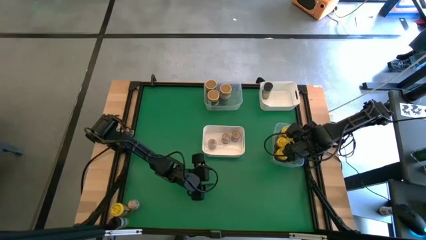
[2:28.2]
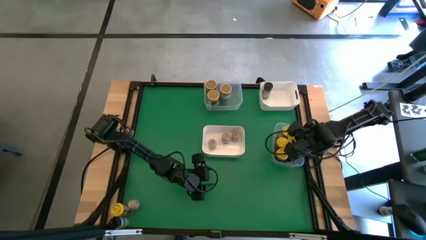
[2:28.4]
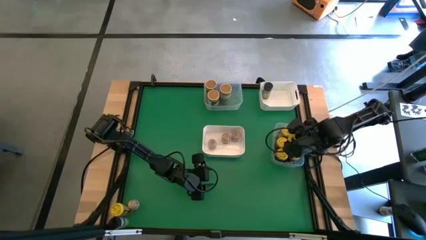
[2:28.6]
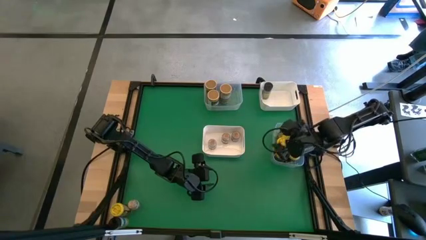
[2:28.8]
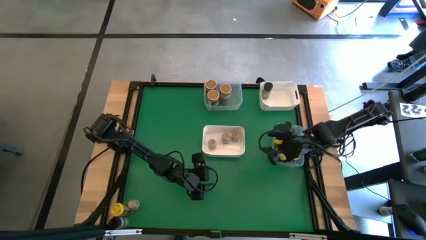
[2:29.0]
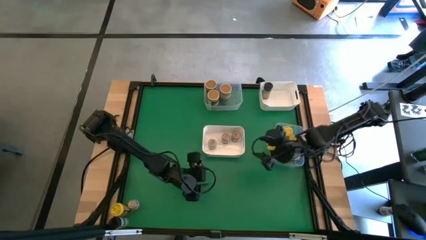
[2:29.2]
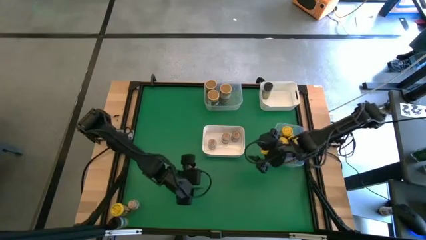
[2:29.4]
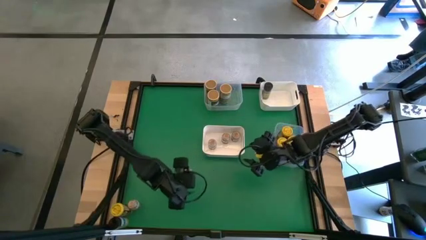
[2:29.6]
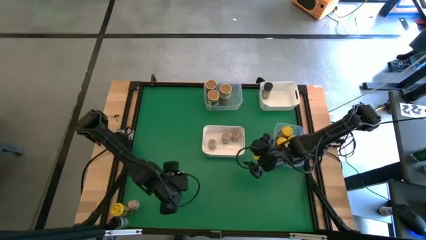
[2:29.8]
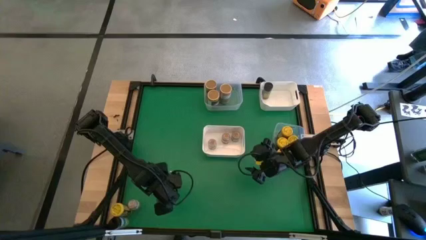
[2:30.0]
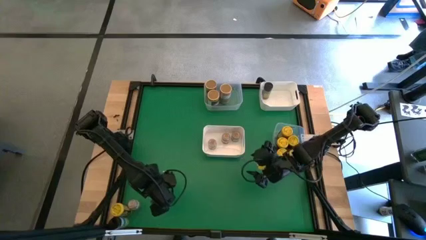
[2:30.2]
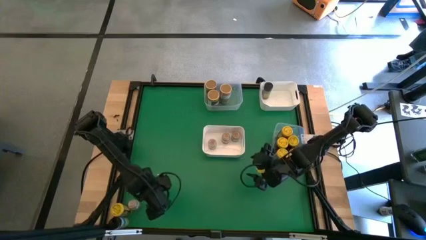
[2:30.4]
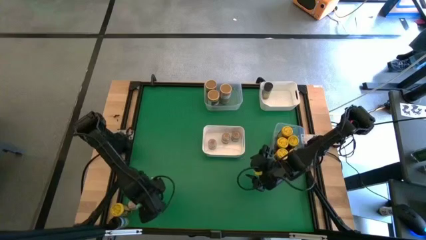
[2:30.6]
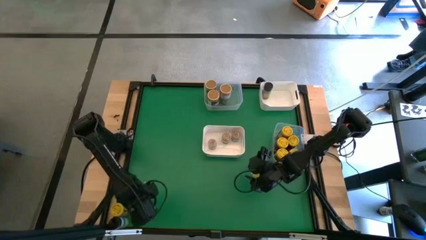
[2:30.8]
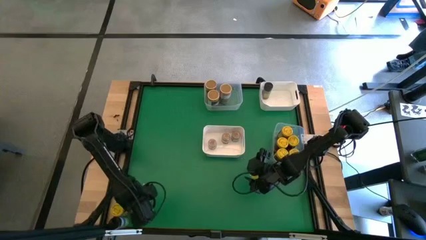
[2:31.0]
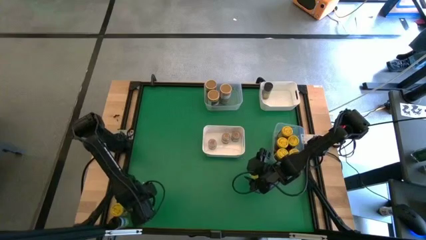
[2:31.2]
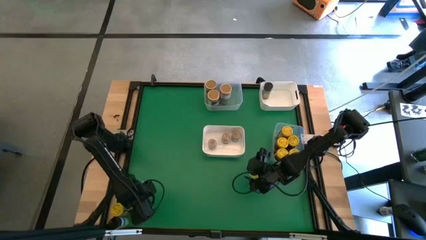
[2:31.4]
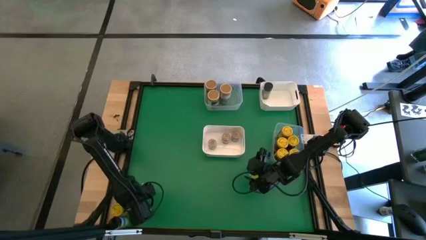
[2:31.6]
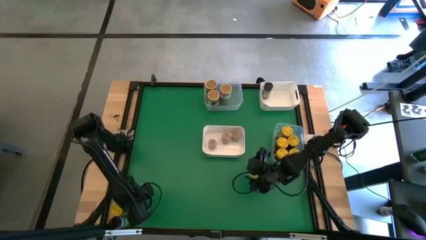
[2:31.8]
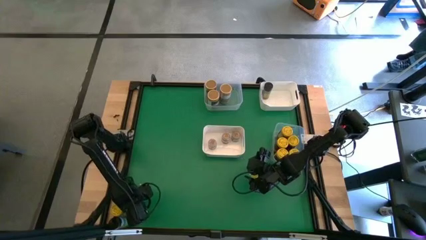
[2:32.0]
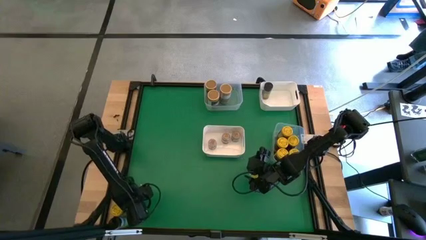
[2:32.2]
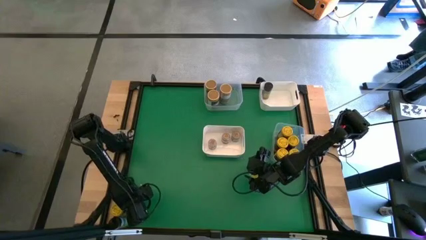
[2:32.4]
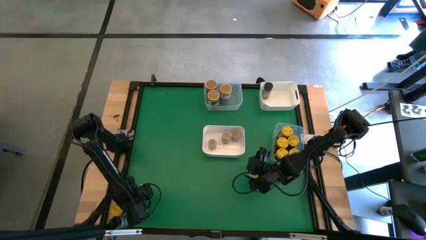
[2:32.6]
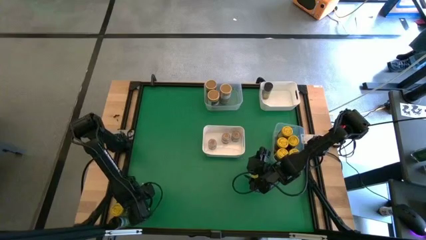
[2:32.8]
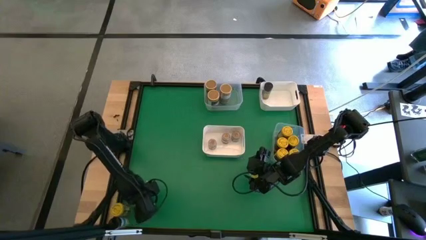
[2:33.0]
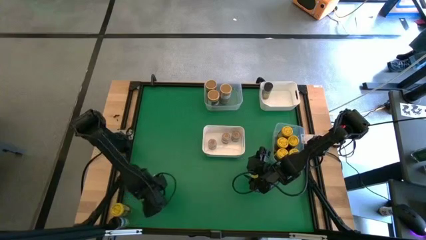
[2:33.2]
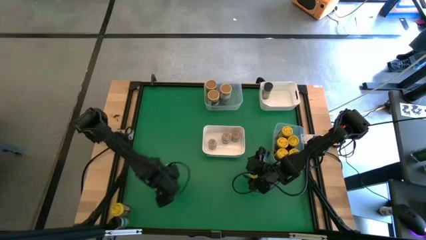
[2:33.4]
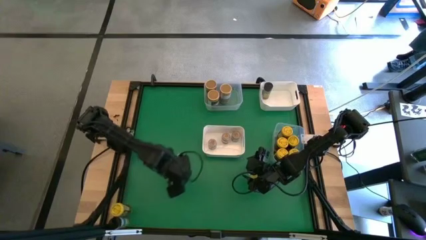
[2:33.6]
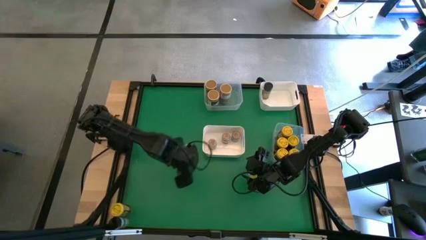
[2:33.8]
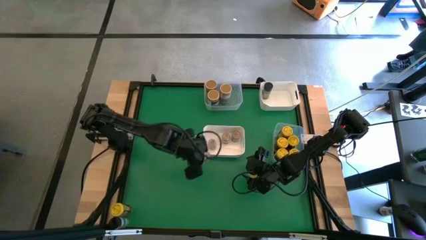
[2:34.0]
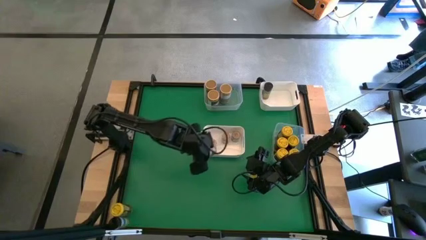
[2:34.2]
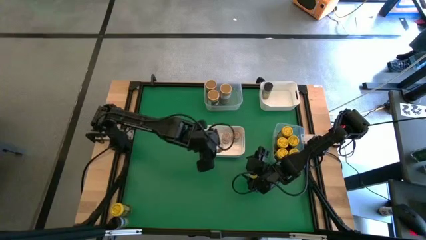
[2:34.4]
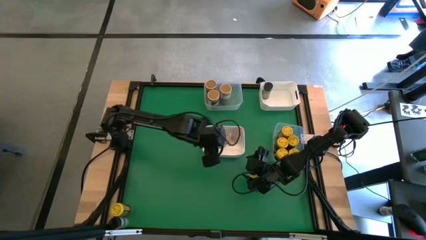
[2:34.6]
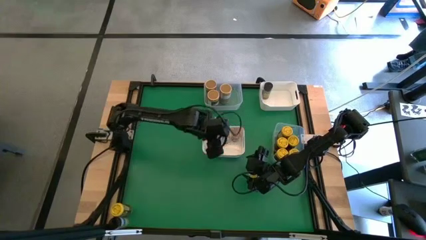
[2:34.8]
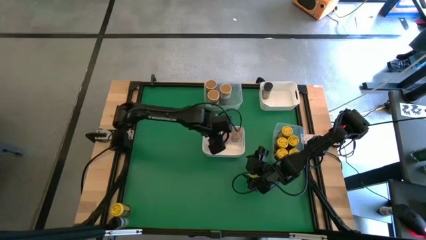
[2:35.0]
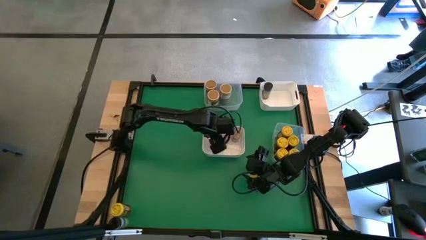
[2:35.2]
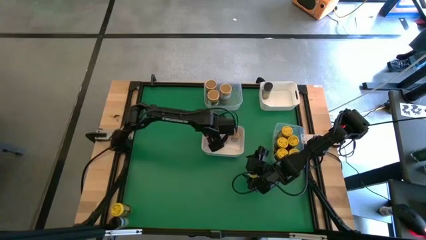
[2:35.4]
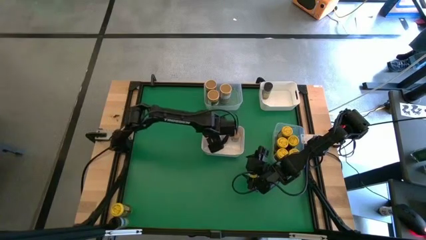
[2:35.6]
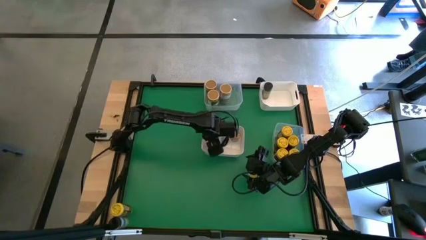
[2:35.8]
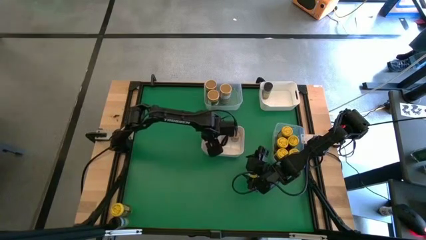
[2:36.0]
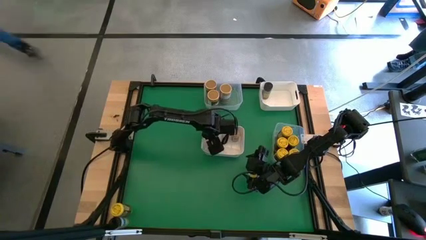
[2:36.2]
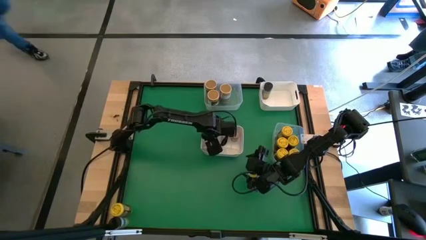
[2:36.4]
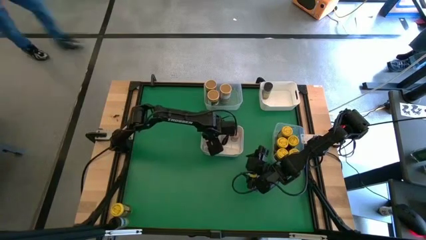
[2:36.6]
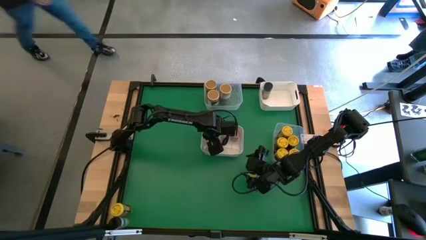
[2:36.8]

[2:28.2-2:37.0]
Task: Sort spices by type
Put the brown seasoning bottle into the bottom white bin

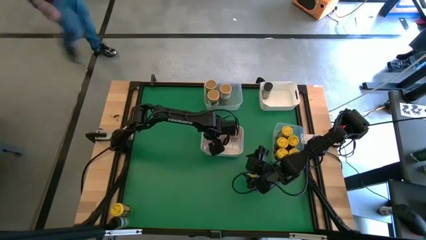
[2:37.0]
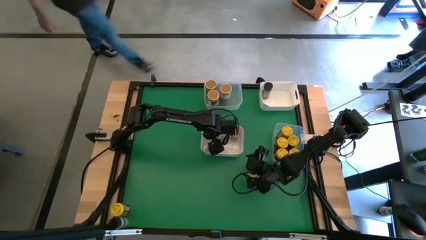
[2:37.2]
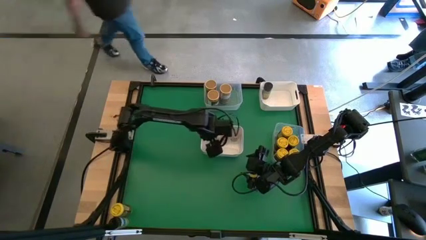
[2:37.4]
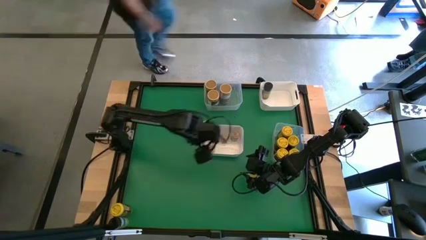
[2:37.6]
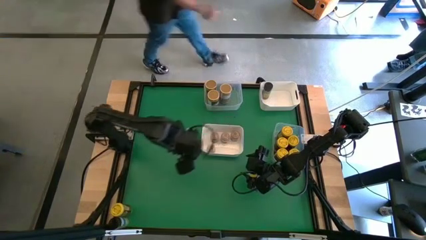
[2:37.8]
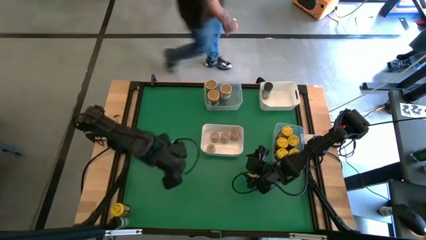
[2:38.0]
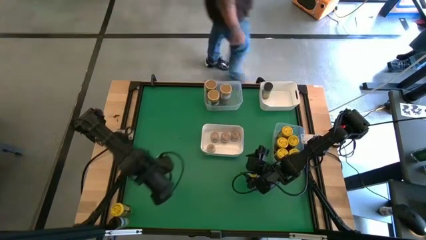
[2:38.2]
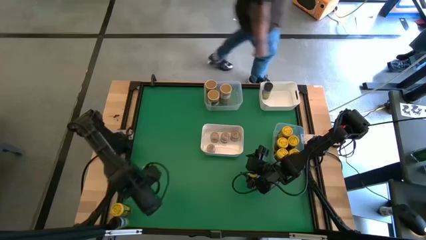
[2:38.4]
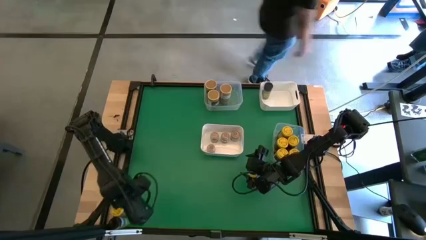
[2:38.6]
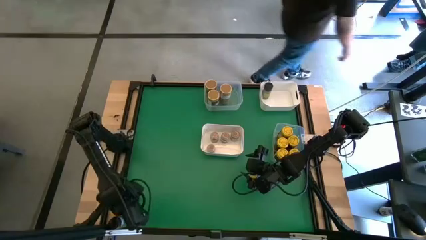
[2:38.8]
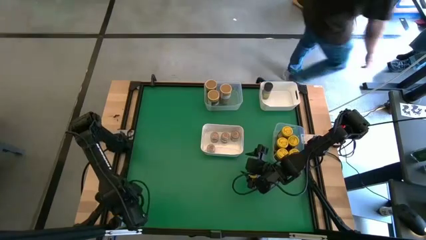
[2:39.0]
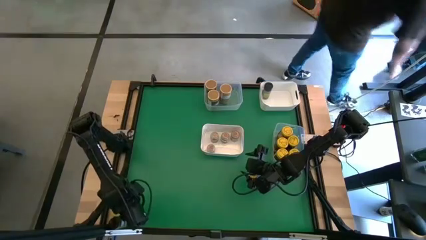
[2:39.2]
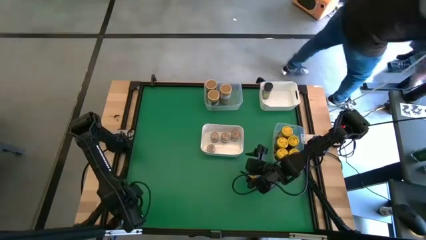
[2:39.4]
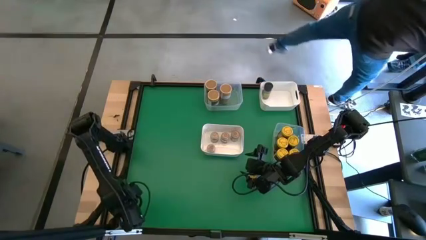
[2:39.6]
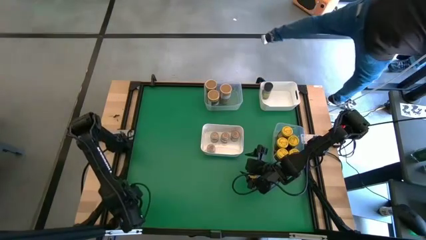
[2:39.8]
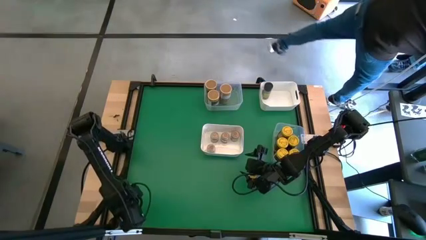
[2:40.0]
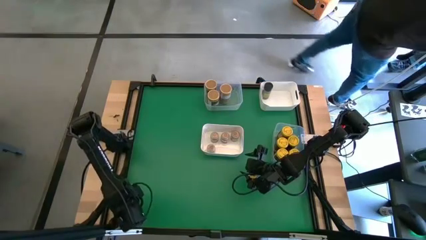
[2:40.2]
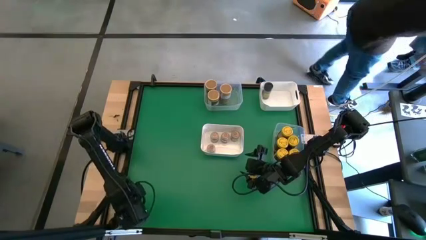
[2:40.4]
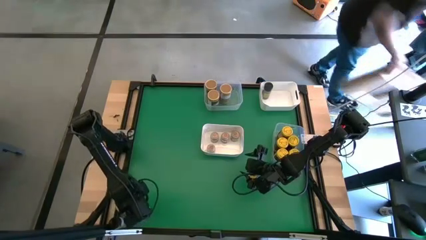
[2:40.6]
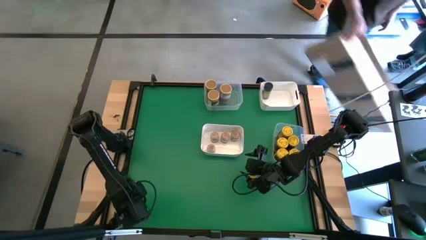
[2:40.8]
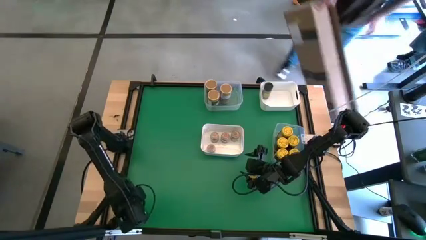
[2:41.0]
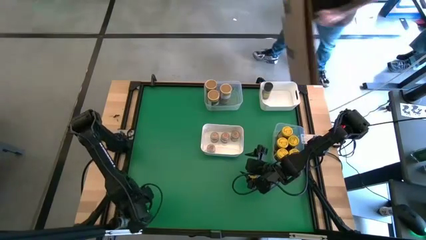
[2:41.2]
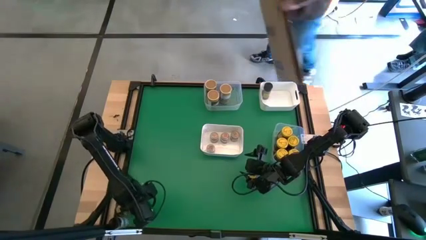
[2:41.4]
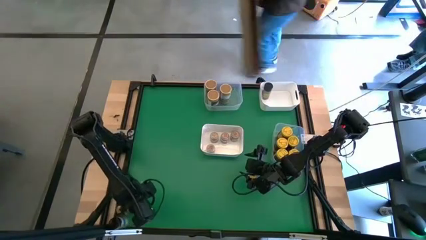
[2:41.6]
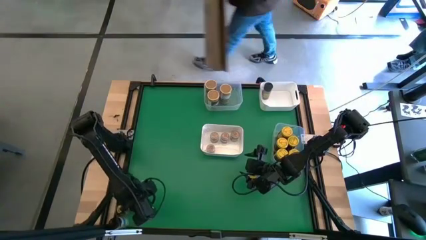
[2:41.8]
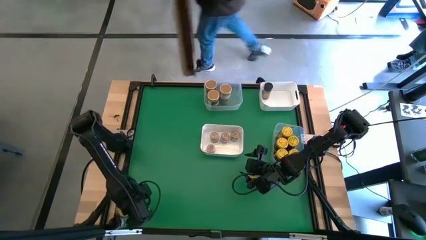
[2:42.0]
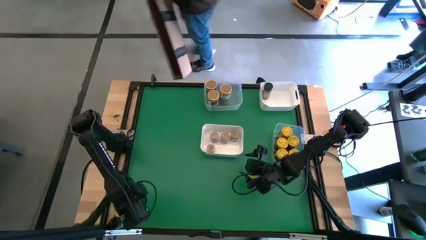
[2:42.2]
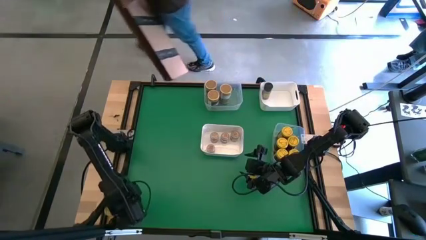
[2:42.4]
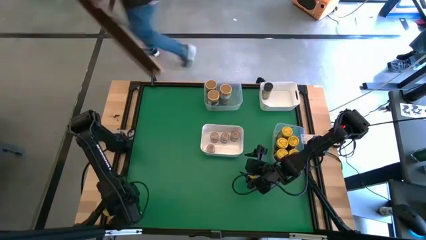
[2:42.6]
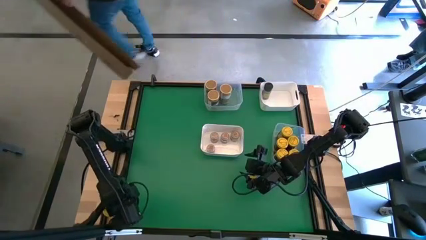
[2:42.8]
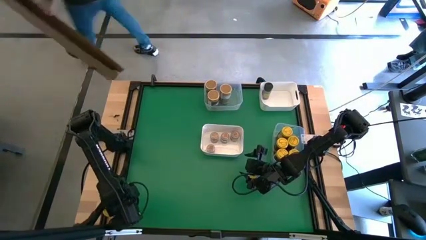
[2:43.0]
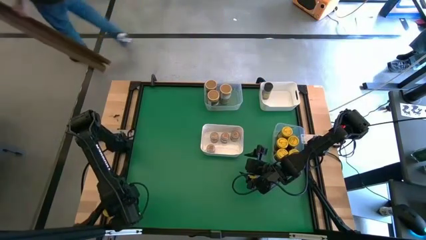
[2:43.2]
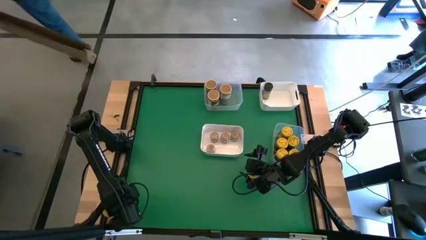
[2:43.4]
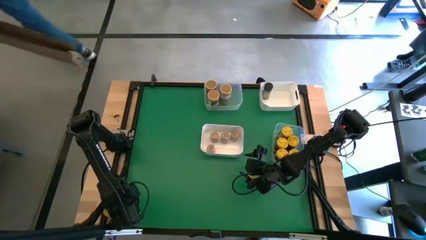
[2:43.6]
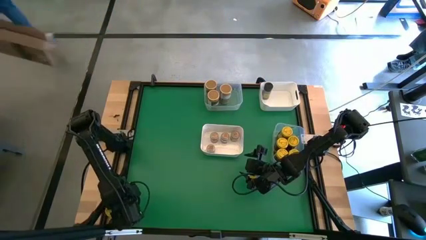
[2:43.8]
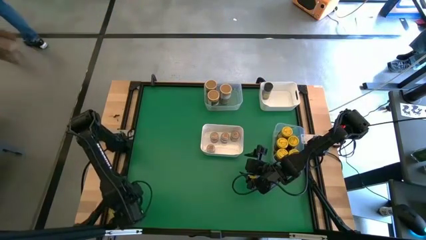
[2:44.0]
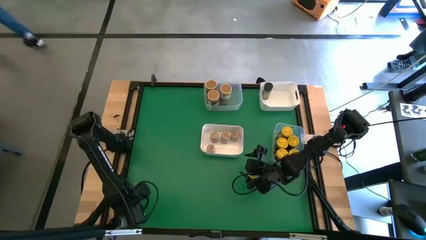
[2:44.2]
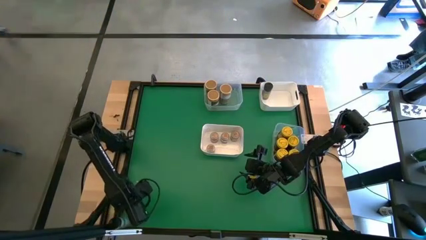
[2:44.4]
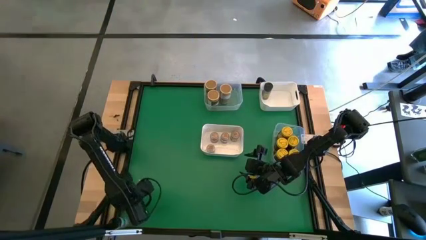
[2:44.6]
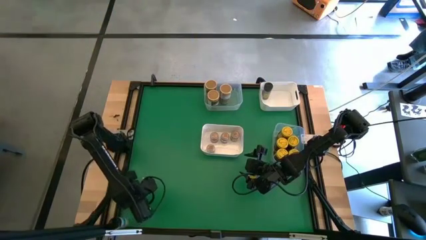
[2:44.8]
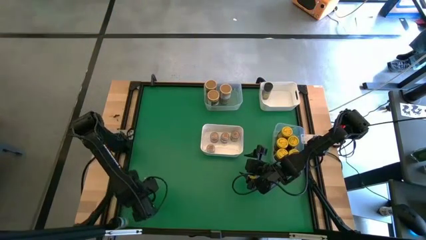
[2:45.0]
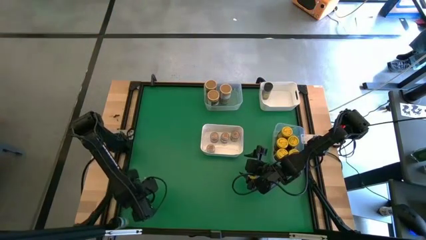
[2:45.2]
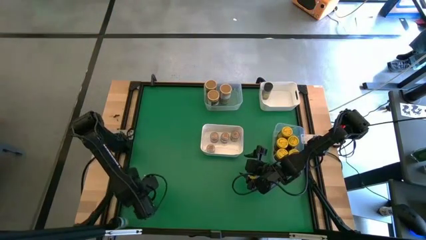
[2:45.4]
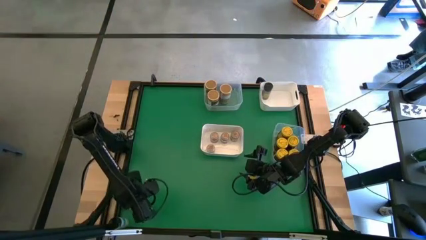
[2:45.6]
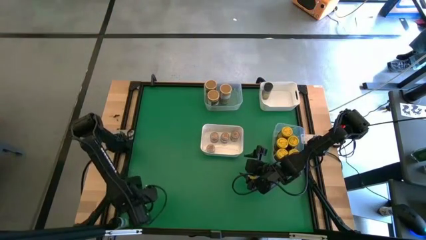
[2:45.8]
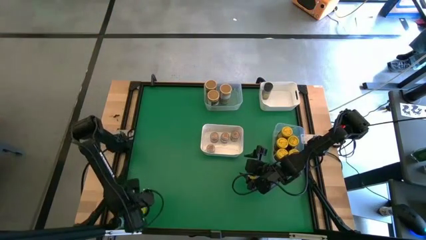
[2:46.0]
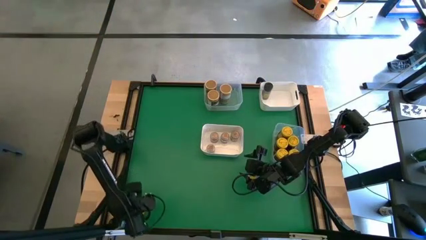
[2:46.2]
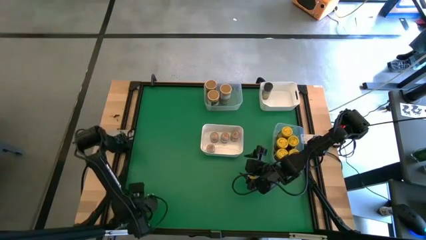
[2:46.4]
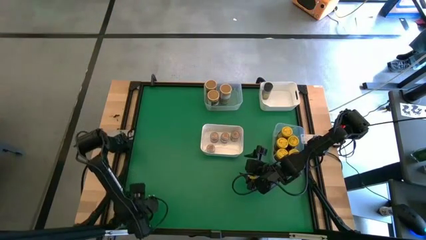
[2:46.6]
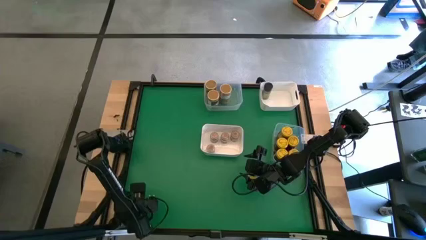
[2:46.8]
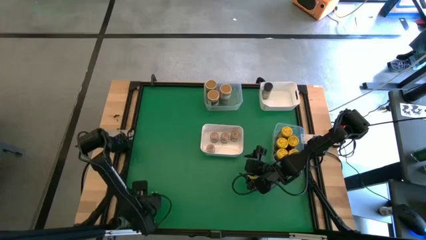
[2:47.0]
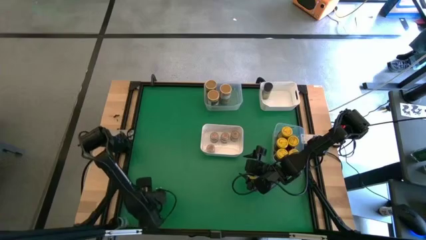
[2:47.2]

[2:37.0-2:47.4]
Put the yellow seasoning can into the bottom transparent bin
